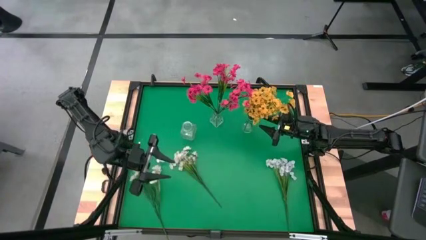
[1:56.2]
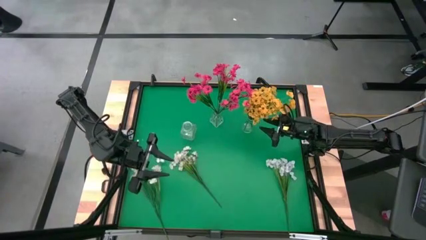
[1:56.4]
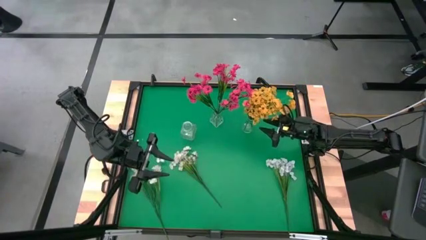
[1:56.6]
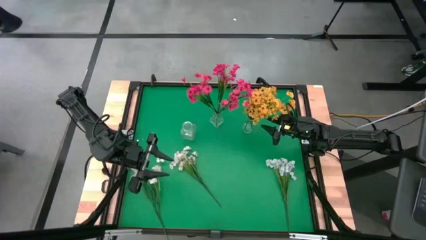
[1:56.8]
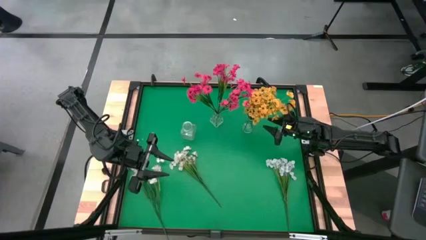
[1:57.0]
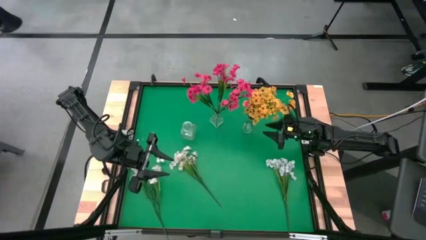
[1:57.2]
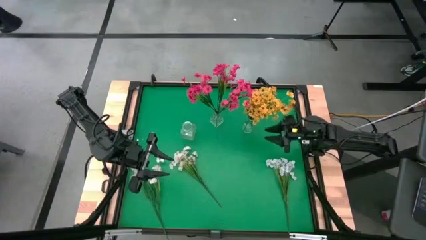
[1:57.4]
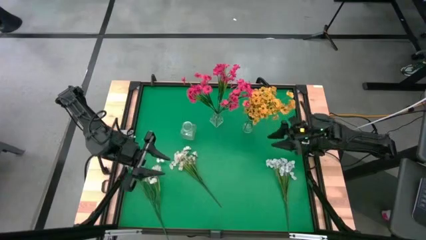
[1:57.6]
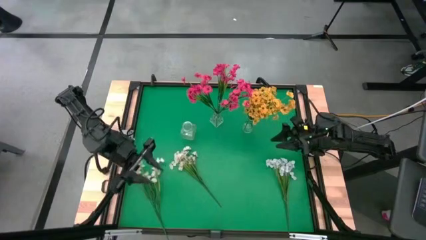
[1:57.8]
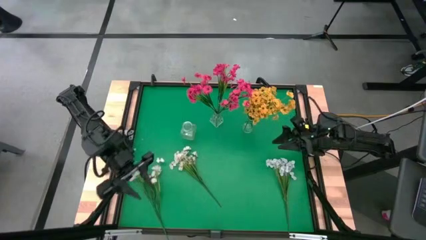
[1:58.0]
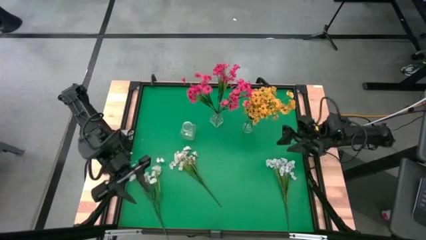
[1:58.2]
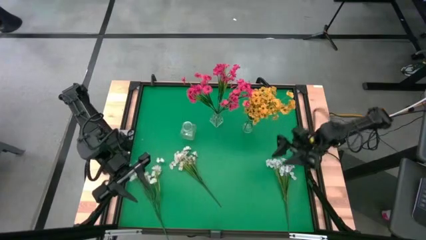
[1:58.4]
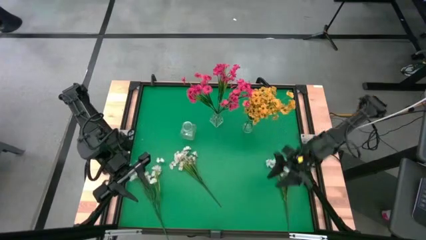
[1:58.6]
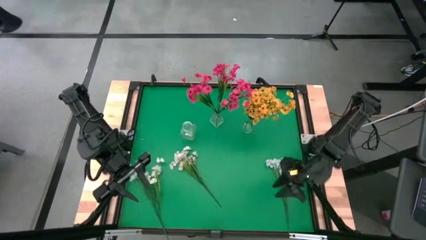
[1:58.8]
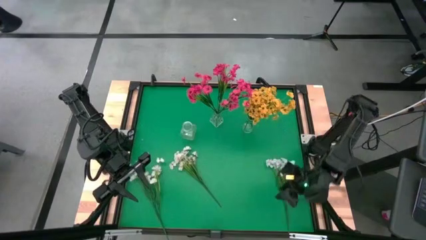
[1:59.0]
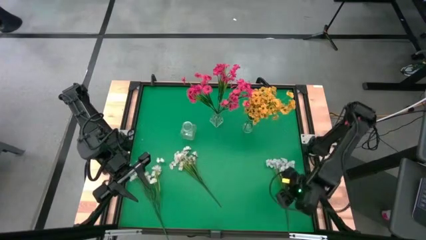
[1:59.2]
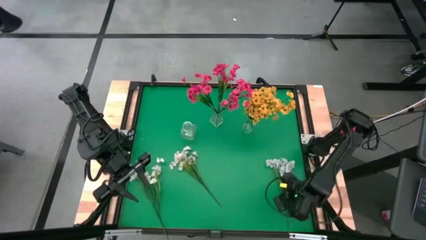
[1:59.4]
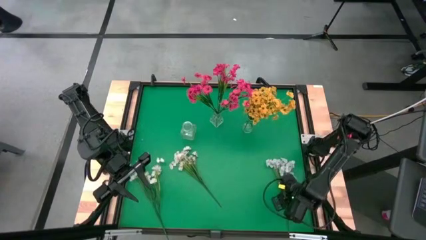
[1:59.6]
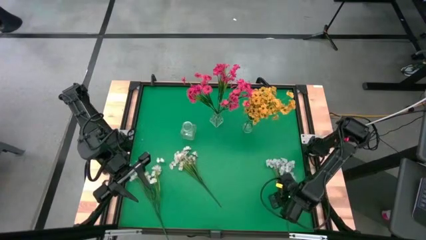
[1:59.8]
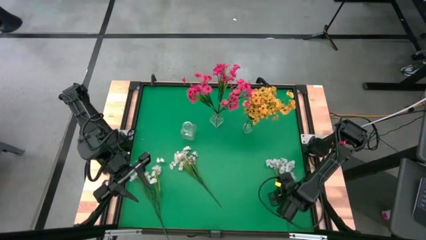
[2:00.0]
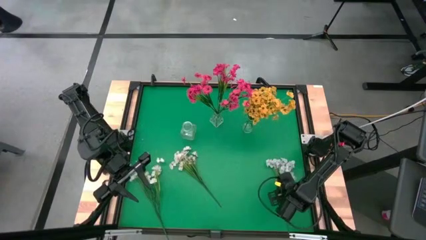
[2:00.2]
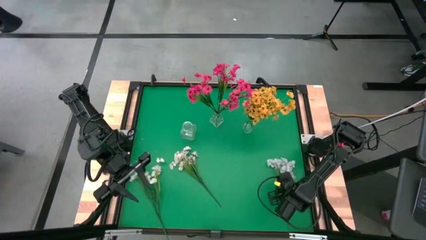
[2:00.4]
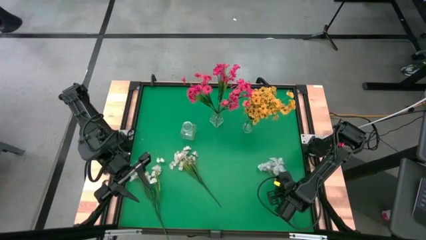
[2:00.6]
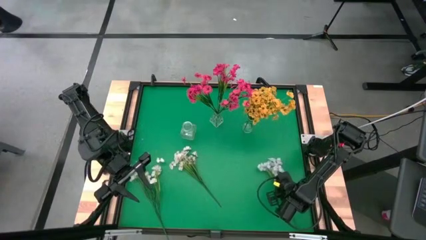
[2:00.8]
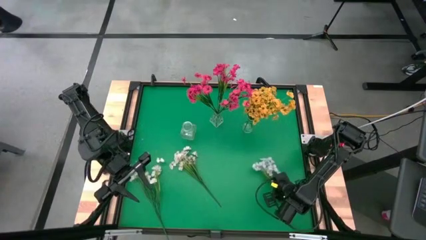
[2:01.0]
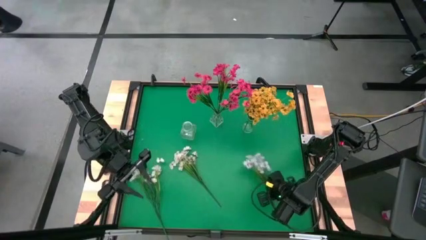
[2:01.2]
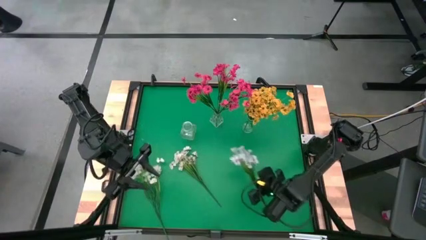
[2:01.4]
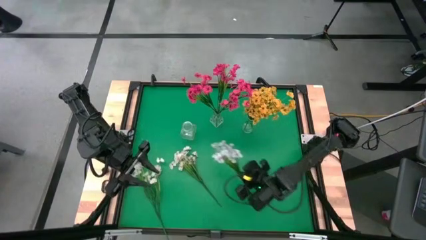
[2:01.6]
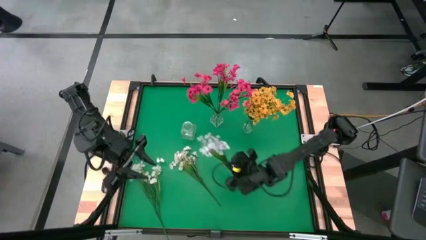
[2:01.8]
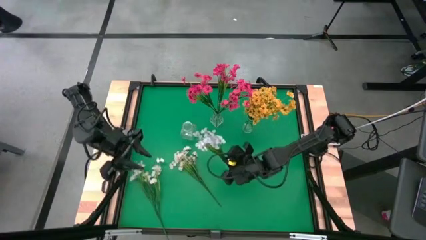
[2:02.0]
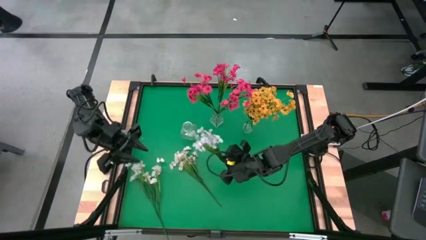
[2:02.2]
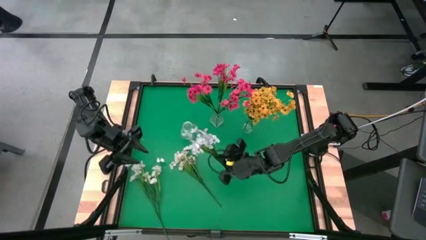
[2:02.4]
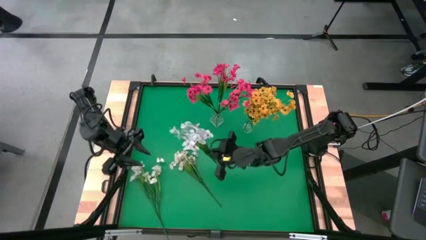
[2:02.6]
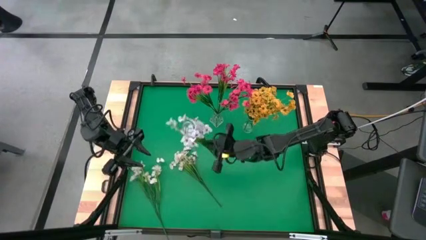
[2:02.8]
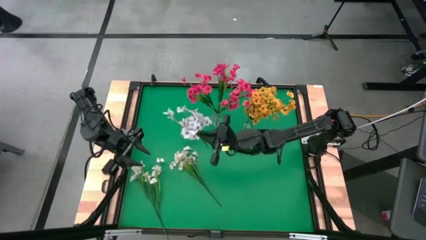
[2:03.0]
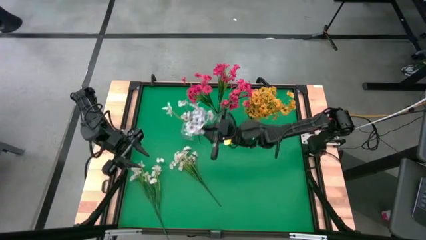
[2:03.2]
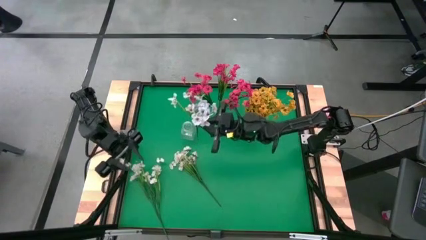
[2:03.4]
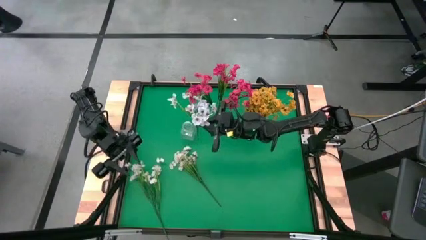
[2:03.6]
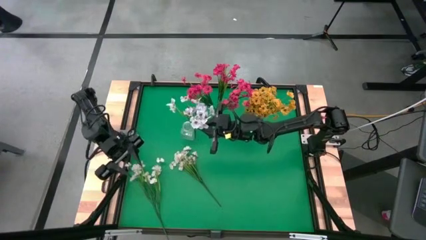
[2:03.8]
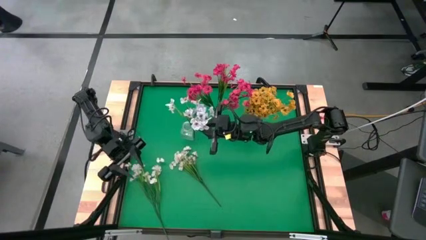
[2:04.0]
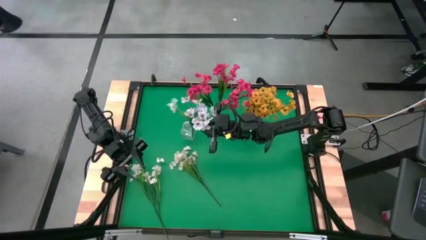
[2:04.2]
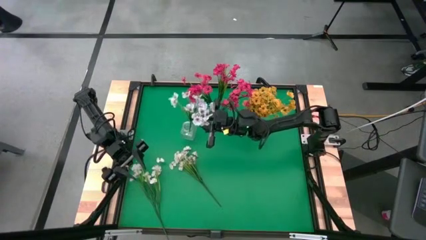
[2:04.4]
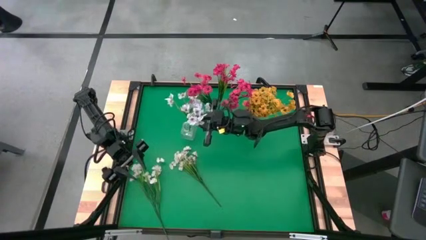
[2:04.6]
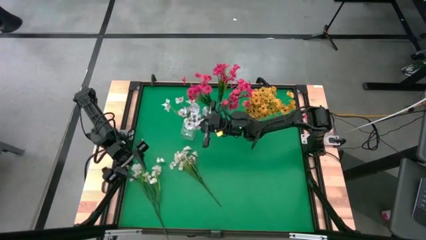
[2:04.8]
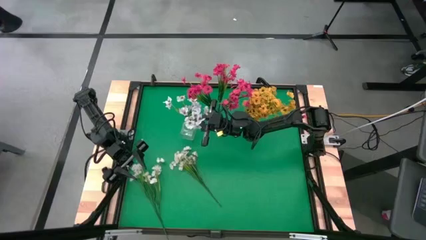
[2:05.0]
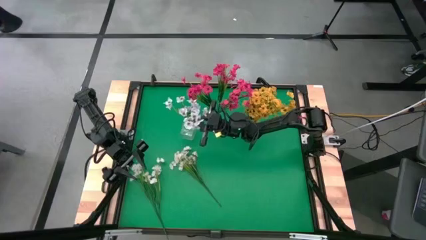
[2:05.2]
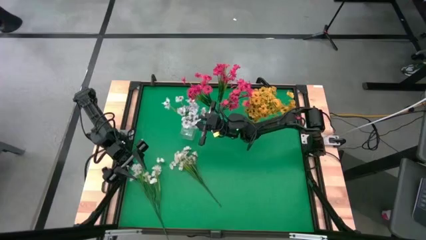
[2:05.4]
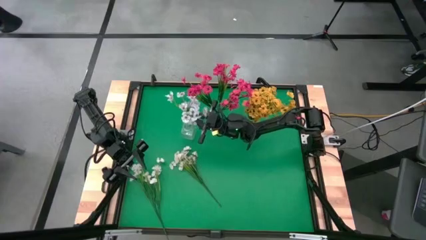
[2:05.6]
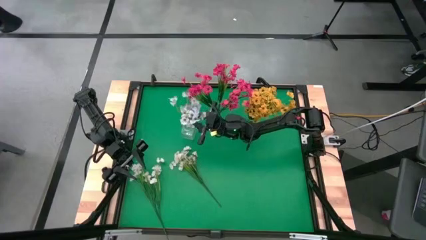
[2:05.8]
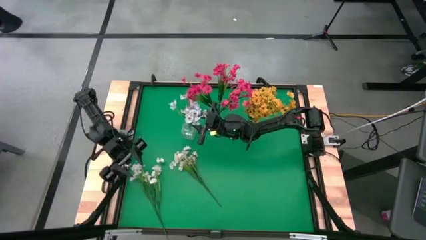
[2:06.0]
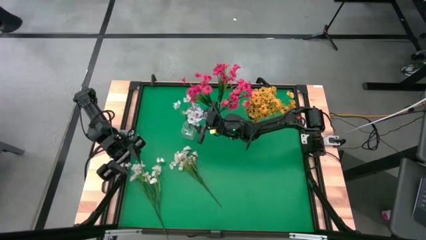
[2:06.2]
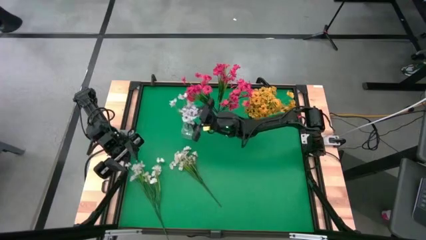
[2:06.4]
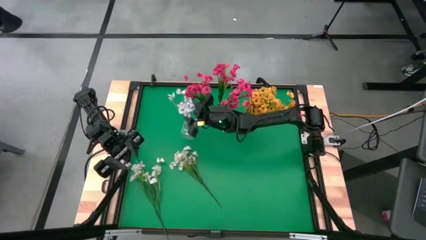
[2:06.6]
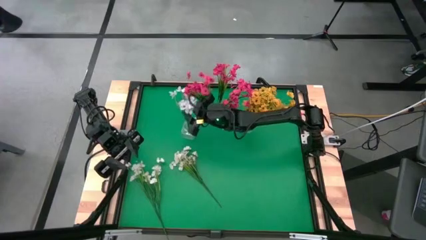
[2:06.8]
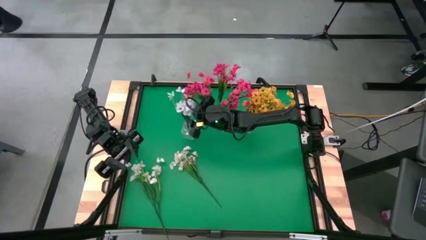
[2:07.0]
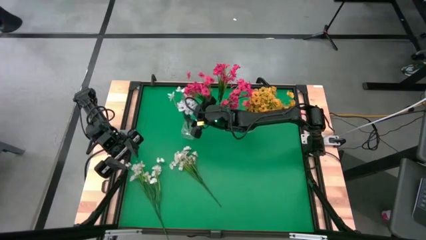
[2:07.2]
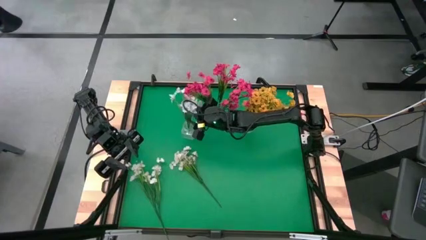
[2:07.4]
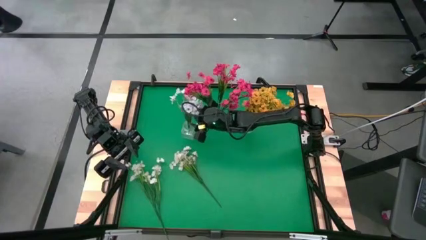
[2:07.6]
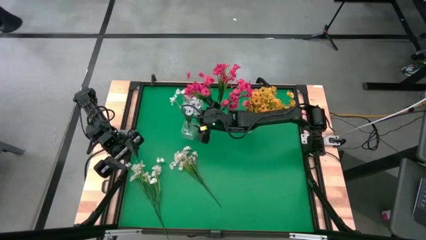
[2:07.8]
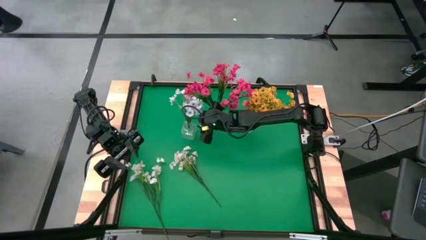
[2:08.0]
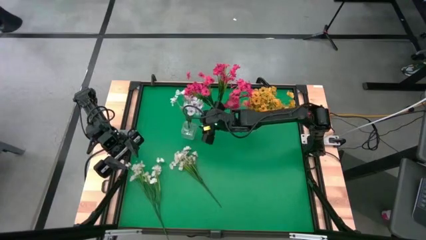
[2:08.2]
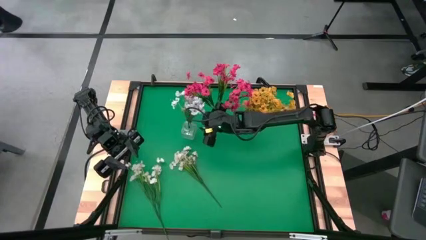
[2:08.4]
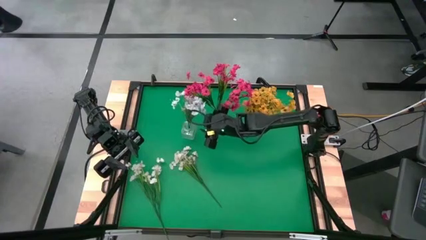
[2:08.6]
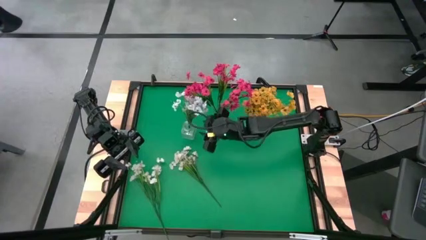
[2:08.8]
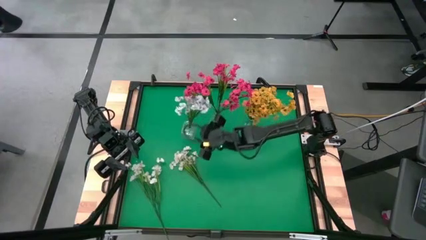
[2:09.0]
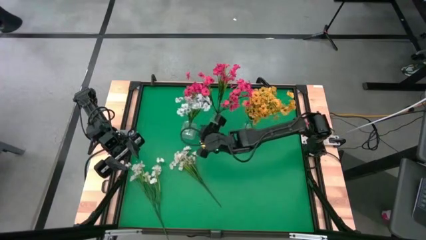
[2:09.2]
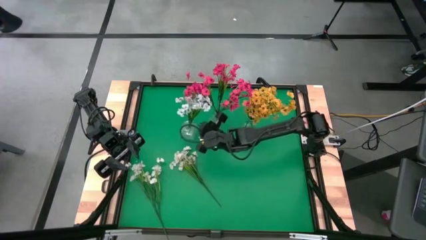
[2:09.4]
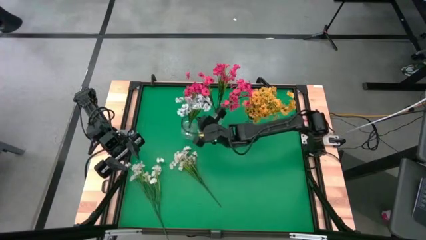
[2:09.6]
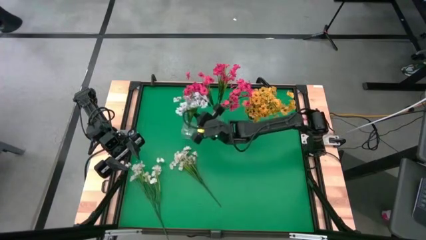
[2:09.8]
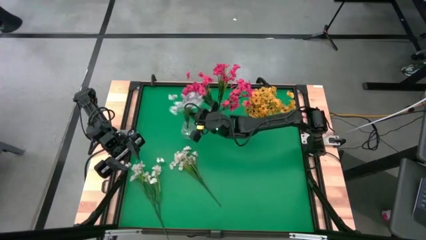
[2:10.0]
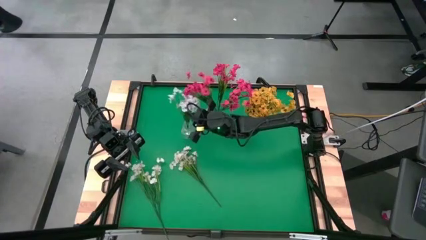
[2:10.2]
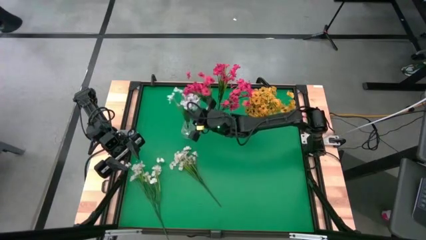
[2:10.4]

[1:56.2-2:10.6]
Task: Sort flowers into vase by color
Put the right white flower into the left transparent vase

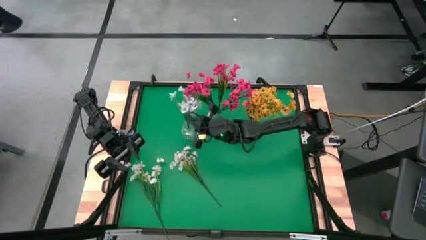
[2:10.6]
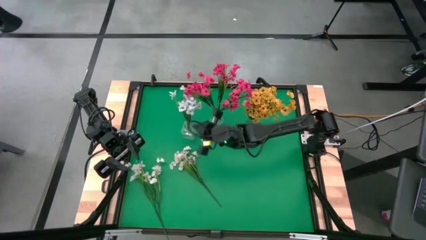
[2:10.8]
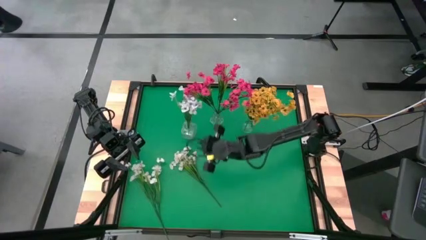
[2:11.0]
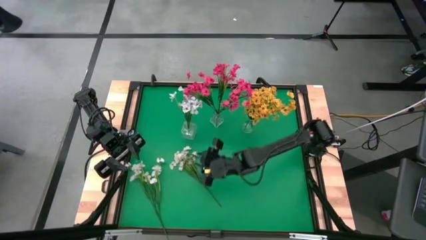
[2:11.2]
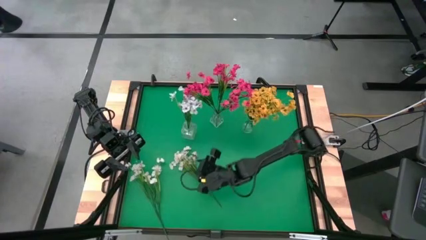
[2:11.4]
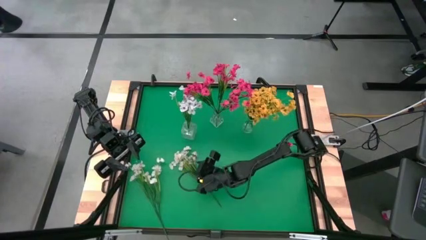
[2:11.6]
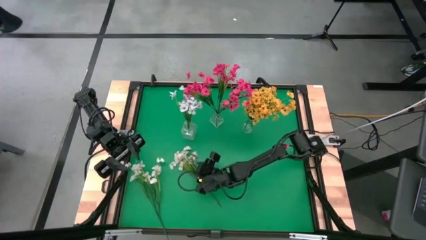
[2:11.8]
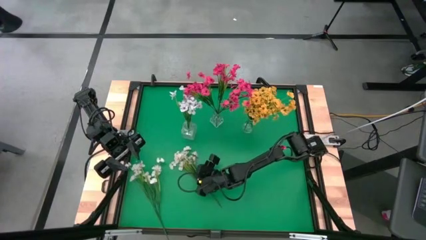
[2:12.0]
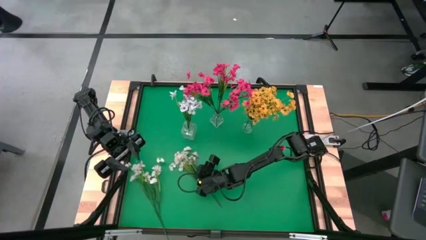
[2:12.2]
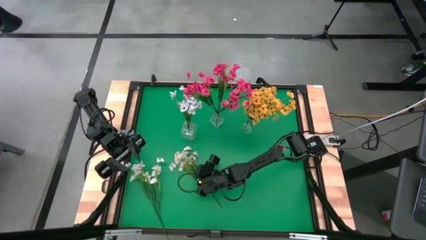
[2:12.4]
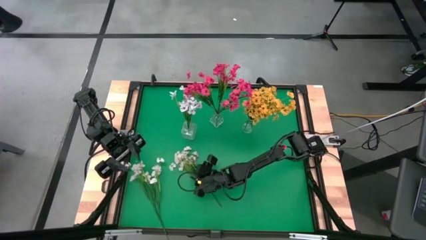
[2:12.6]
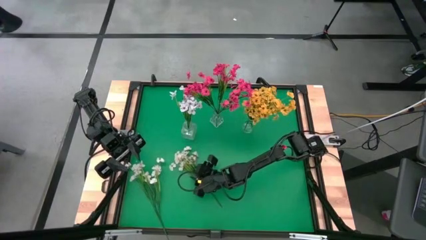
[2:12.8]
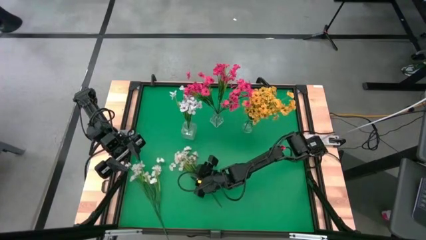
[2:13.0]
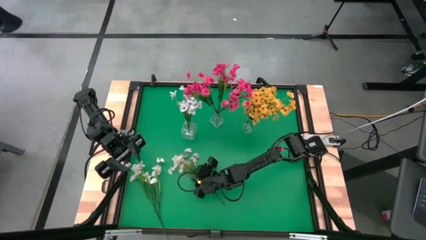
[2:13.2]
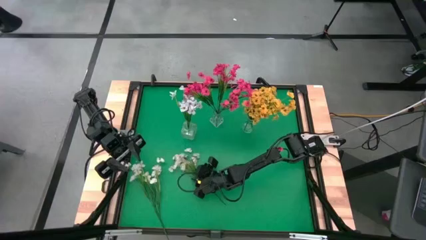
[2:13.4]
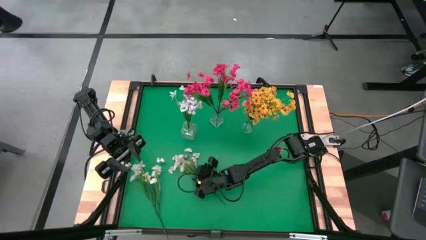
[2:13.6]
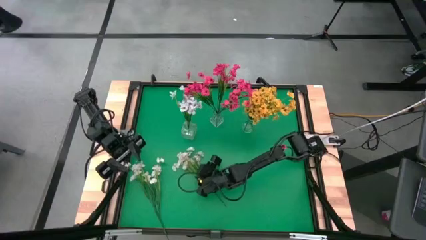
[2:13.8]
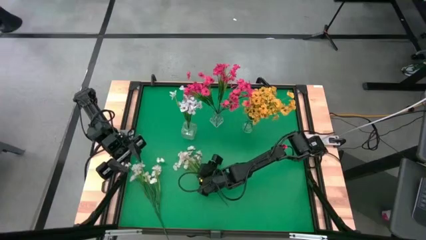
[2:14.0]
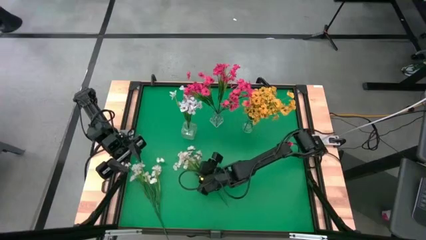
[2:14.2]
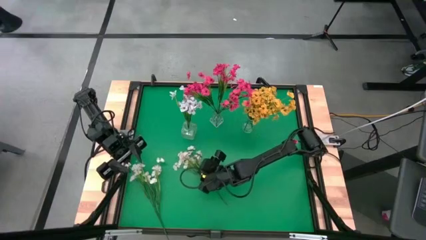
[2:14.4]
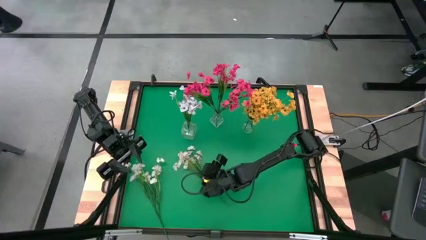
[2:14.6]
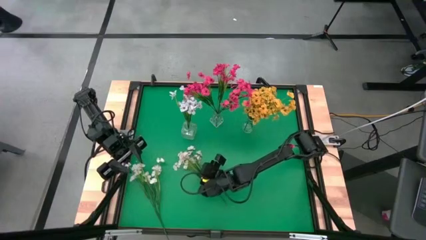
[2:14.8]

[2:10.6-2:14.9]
Put the right white flower into the left transparent vase
